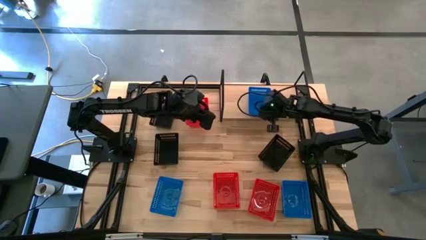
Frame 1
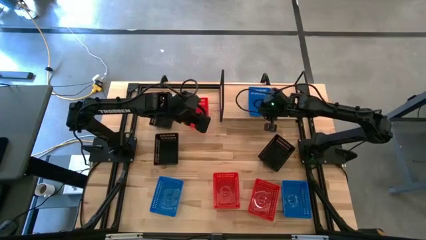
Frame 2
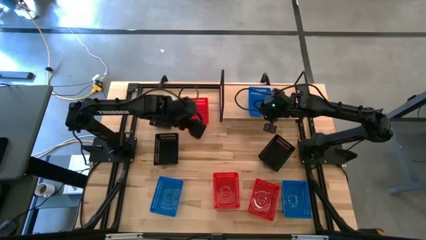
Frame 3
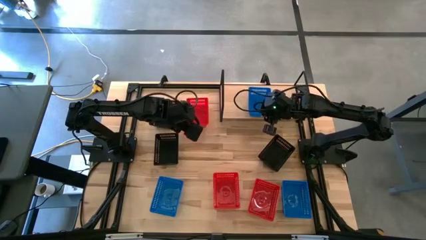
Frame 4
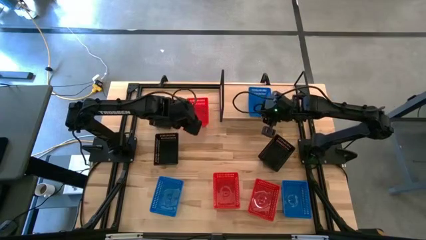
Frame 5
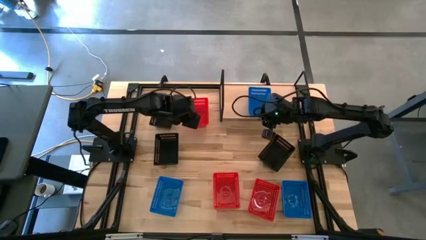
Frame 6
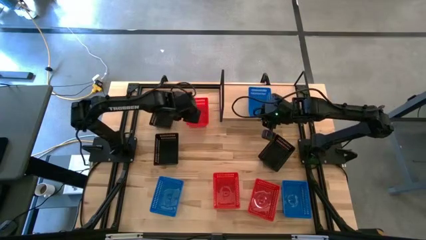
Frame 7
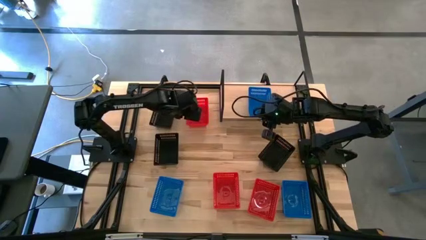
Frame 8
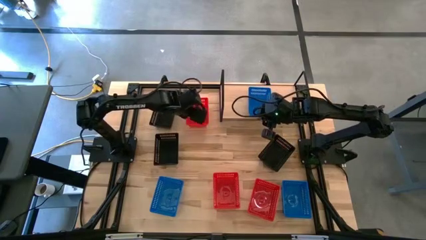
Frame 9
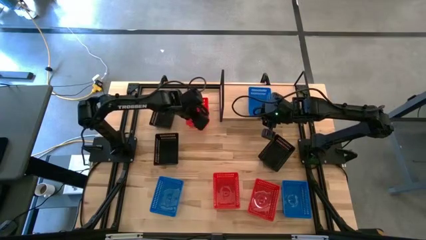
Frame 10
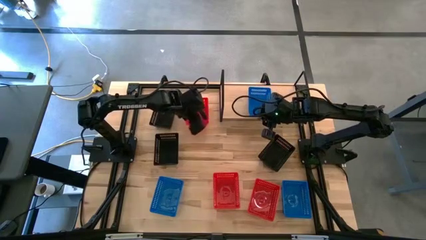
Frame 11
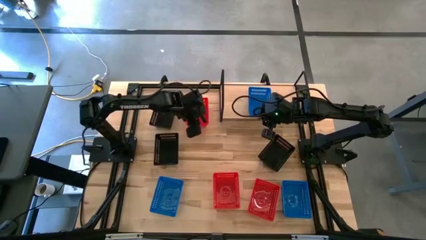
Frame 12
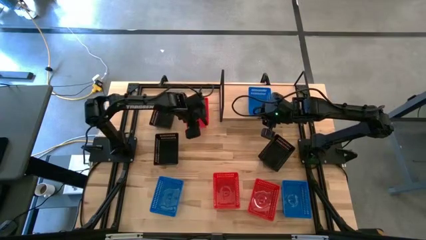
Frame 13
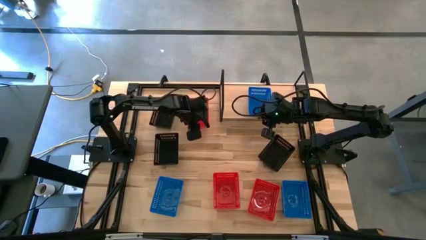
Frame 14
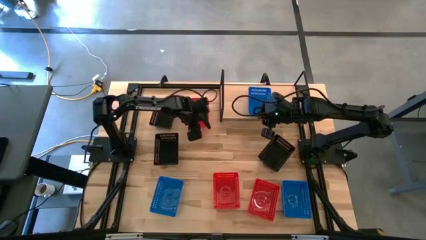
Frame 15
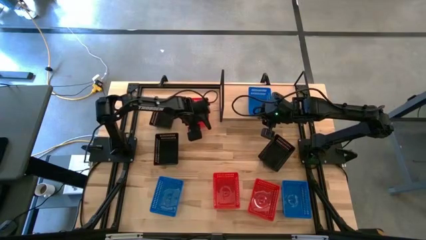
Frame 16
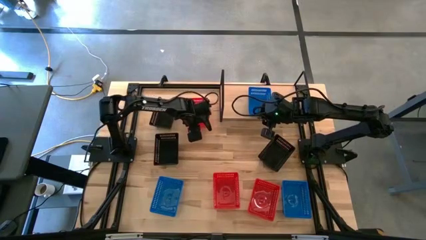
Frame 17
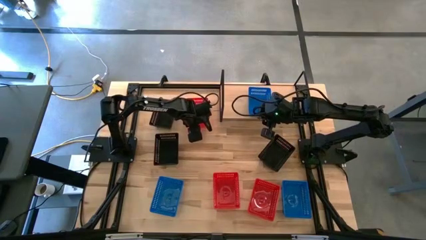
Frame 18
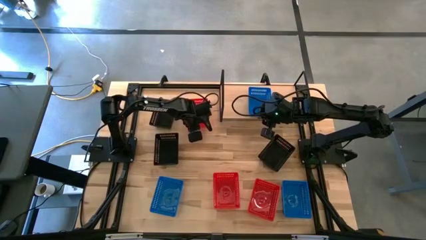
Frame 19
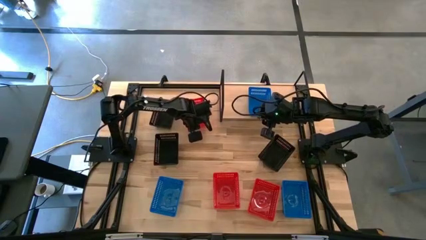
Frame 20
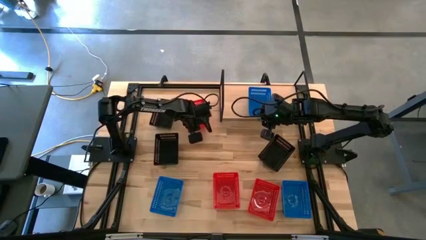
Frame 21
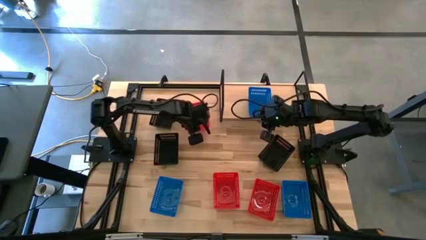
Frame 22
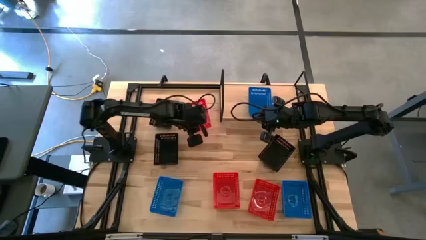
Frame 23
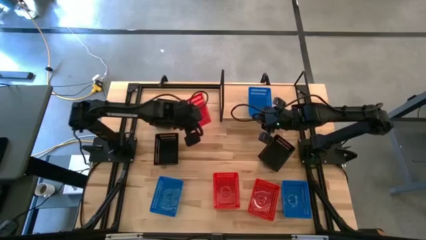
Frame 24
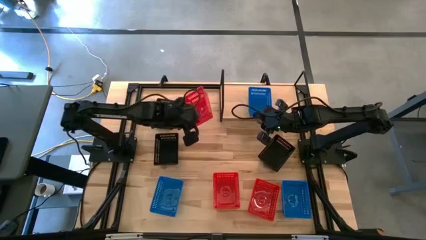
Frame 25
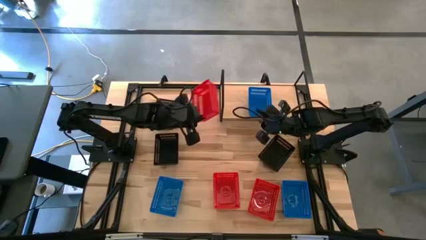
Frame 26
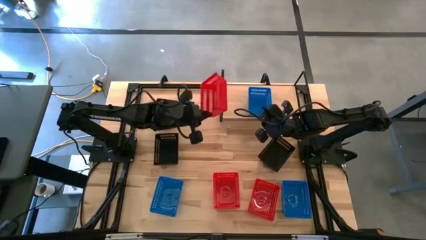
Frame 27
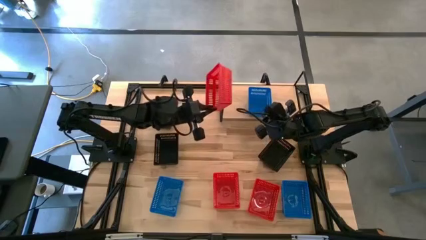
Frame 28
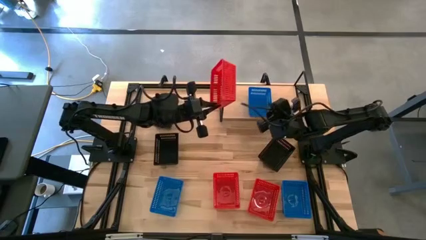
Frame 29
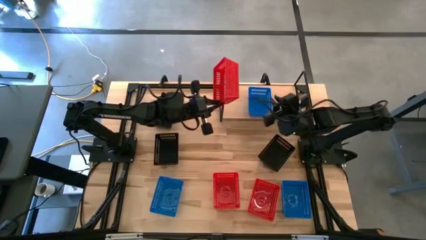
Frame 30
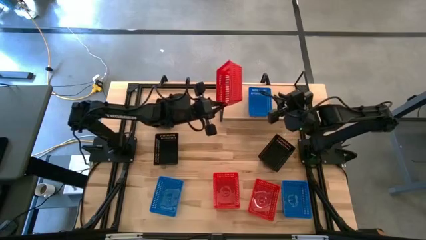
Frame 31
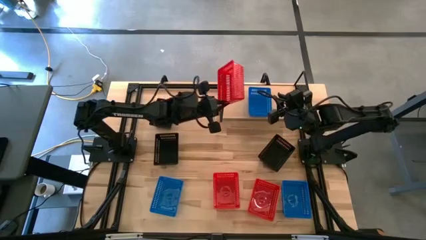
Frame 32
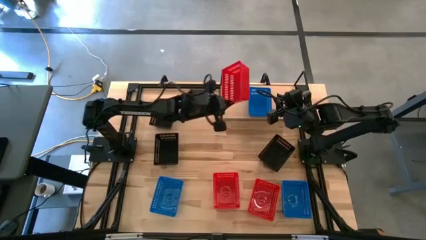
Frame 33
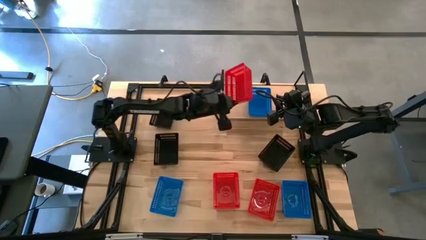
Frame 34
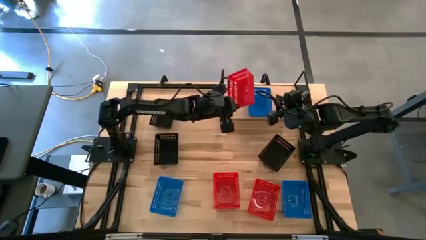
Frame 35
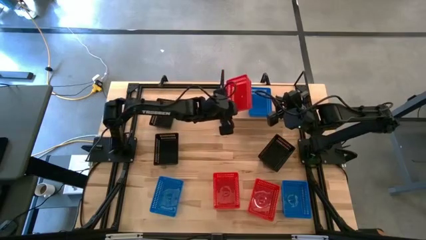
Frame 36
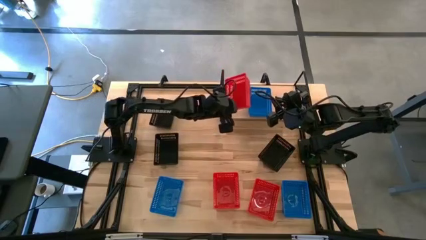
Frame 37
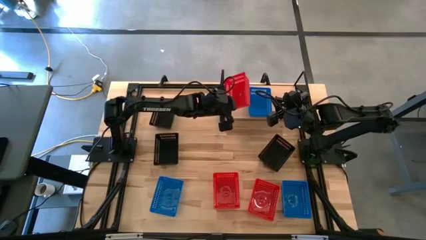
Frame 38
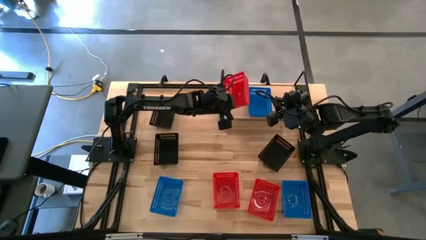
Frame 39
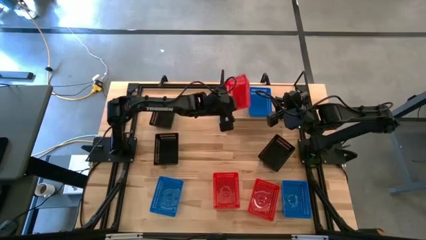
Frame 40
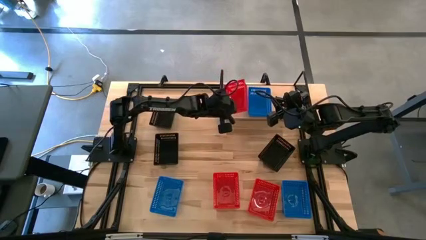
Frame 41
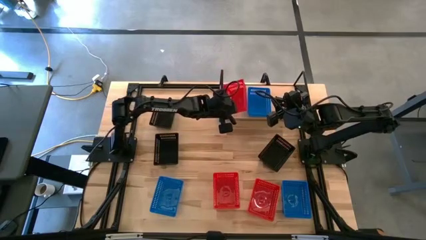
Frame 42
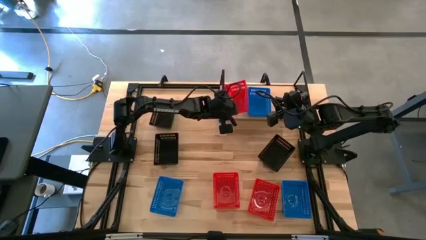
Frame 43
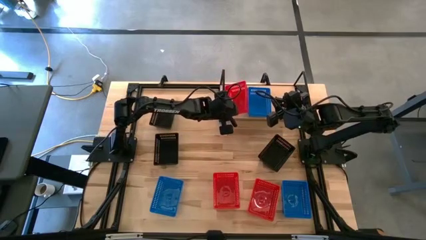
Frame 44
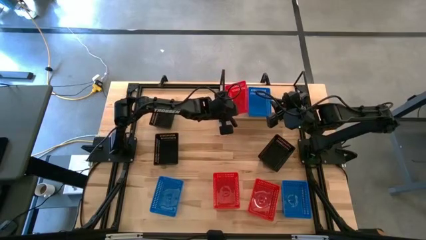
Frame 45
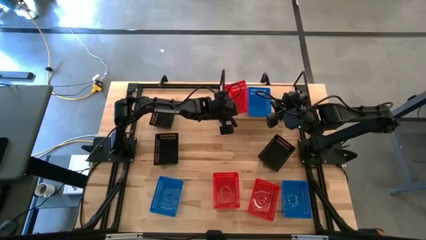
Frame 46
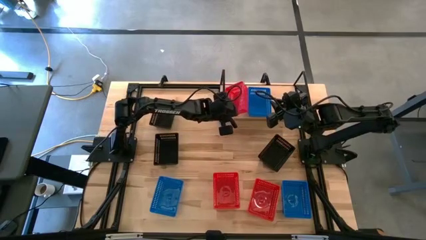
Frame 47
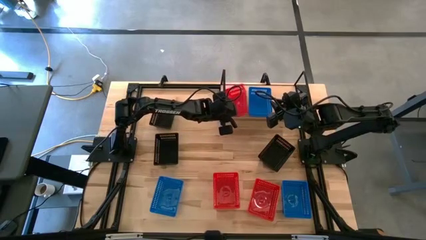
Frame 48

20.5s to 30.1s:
Task: Stack baskets on shelf by color
Put the top left red bin on the shelf

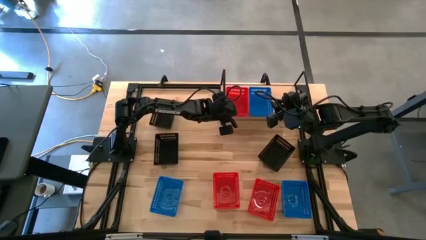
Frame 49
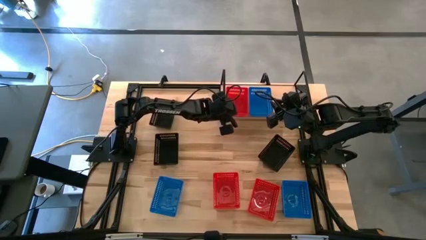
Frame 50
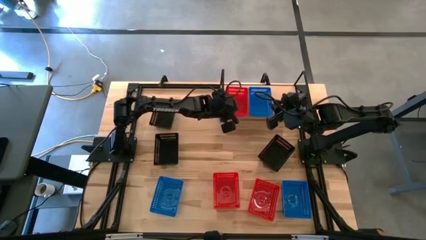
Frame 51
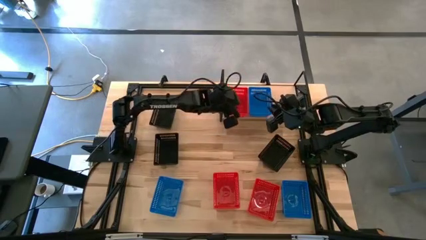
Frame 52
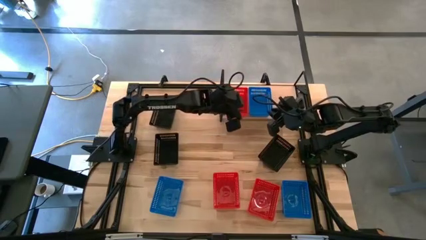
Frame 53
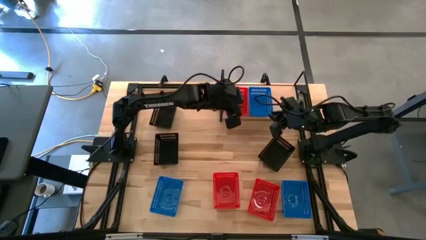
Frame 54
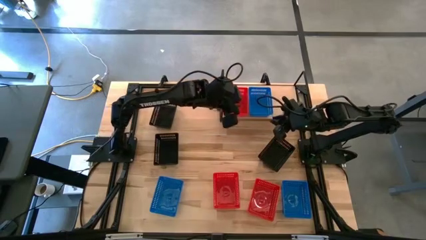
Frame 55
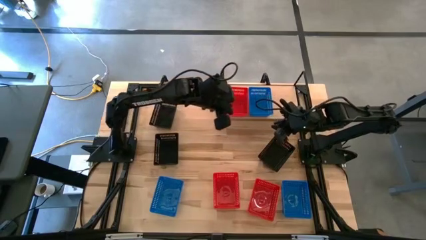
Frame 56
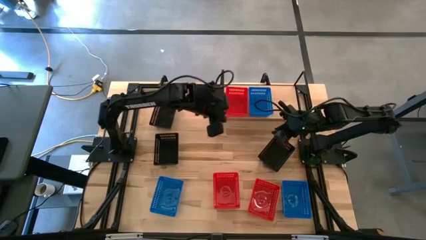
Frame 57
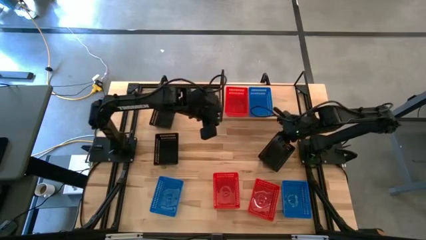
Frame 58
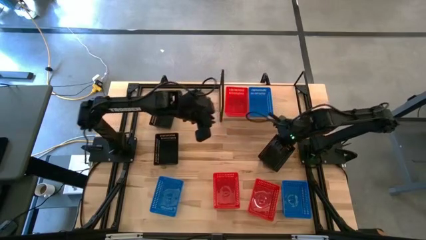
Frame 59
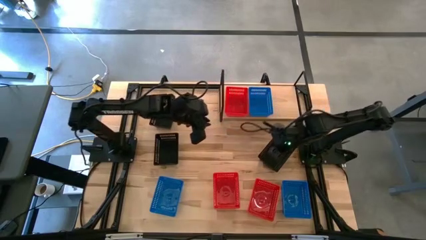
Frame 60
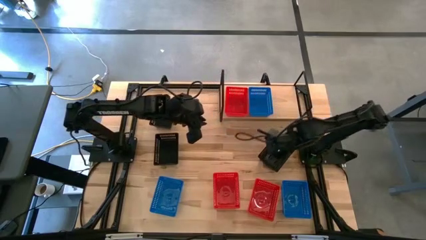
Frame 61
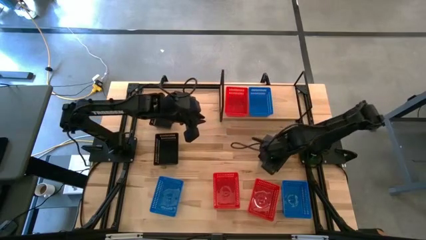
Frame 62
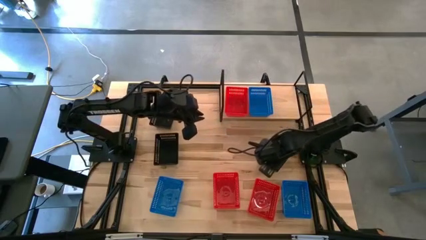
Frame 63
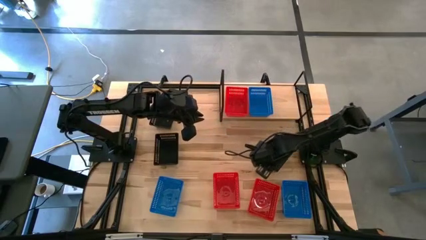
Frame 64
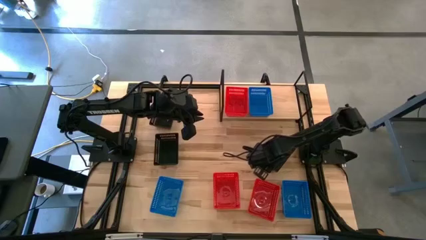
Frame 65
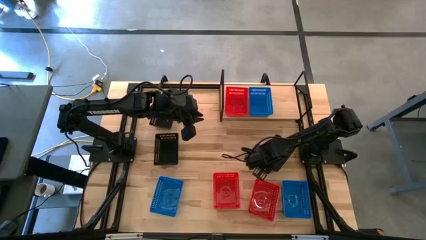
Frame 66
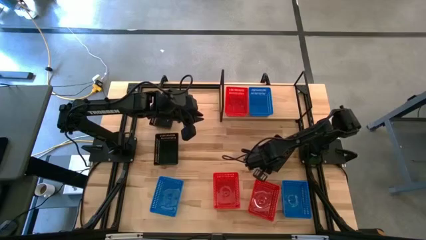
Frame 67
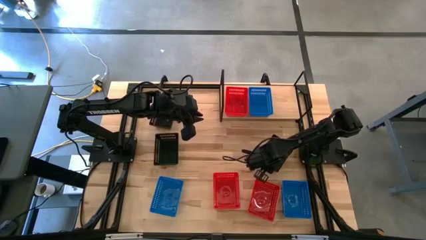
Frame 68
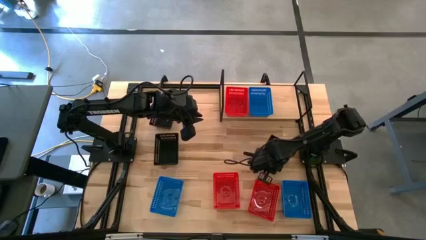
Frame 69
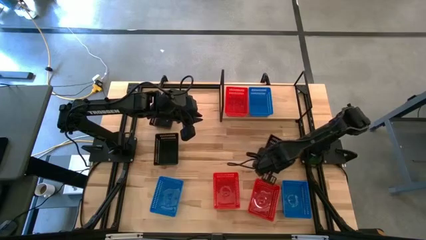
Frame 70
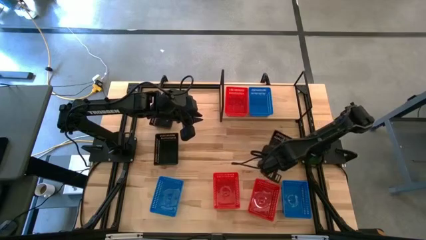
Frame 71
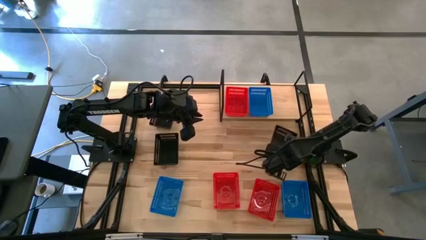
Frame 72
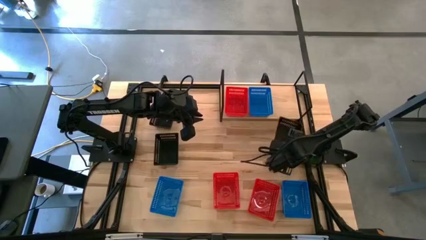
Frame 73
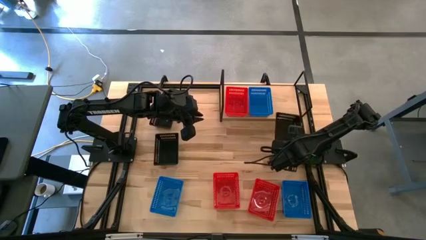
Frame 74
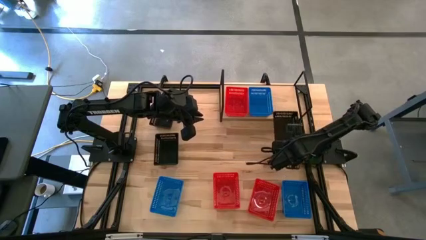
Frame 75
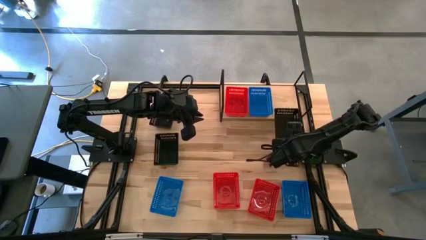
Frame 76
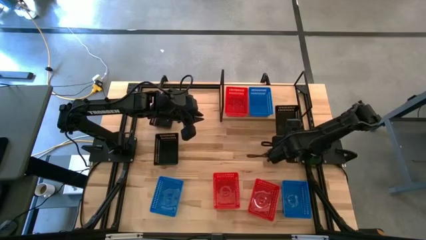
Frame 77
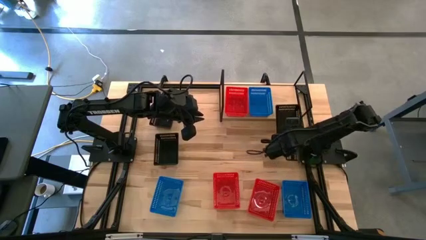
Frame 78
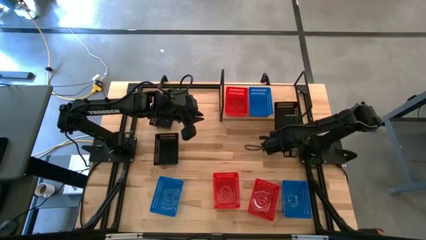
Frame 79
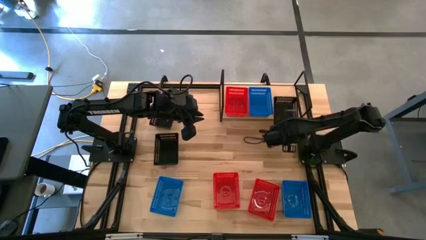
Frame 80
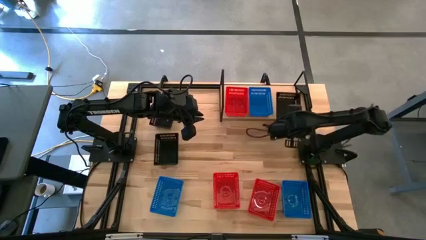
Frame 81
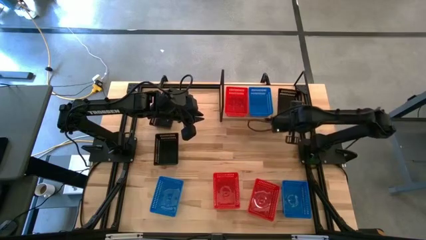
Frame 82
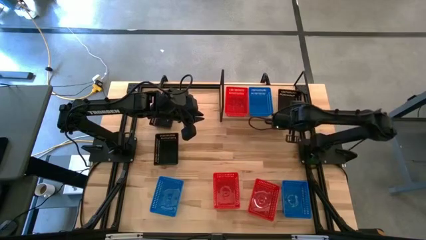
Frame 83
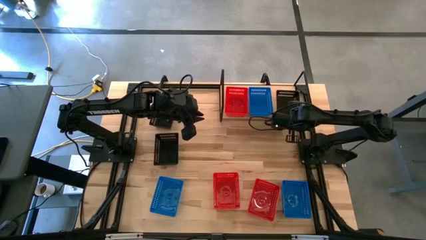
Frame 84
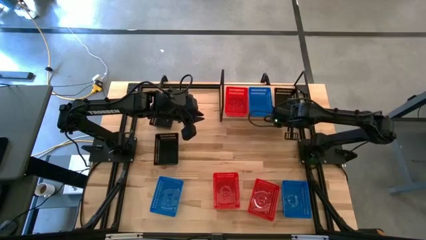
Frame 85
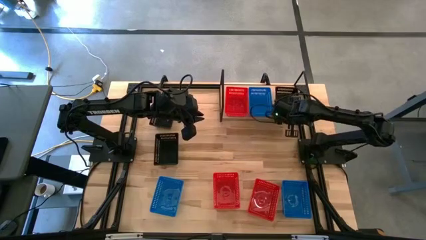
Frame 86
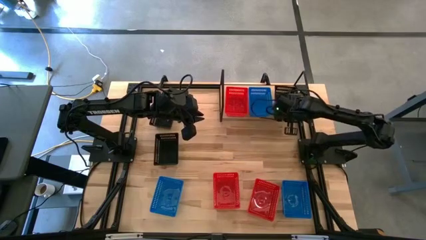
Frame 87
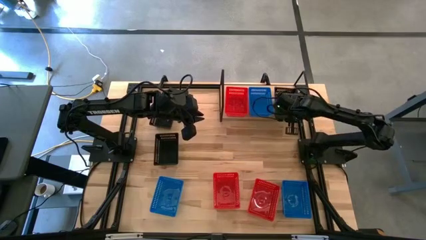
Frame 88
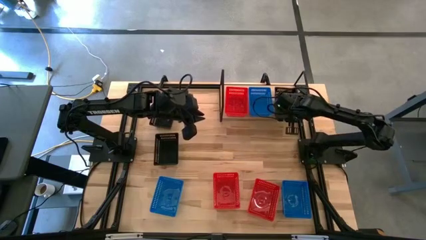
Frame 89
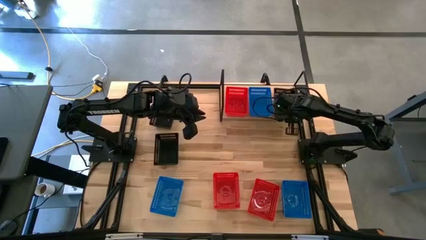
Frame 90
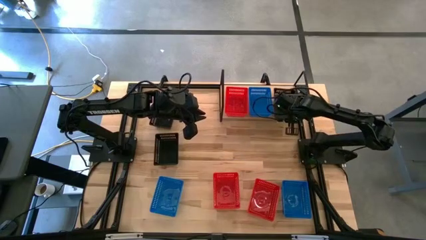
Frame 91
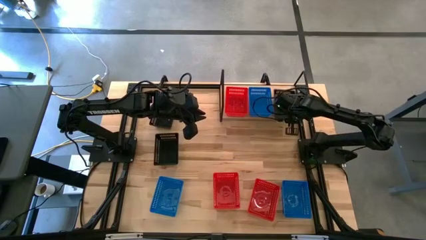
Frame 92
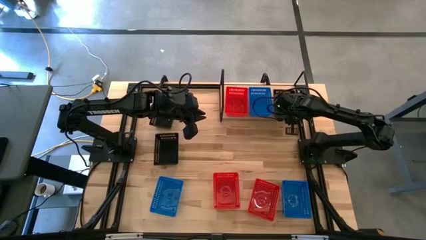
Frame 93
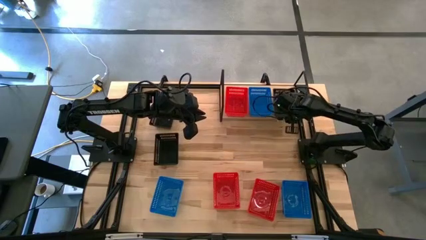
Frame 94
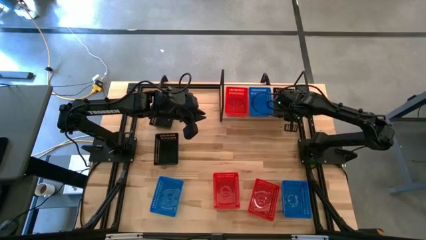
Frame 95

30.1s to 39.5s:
Put the bottom right black bin on the shelf
